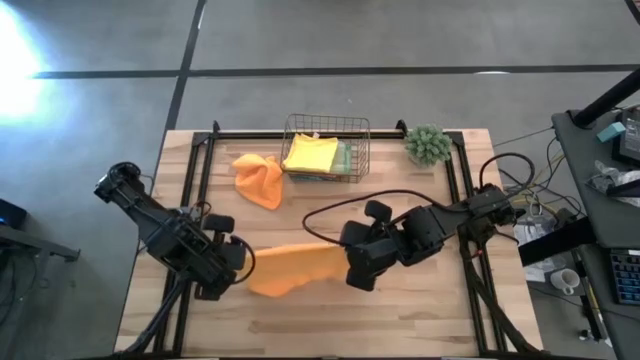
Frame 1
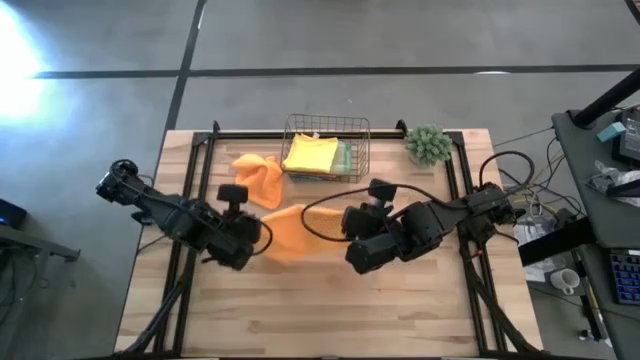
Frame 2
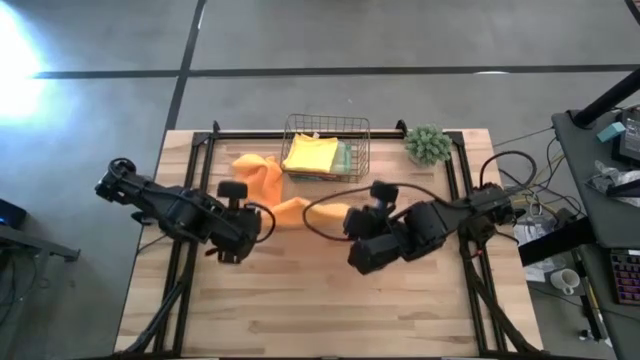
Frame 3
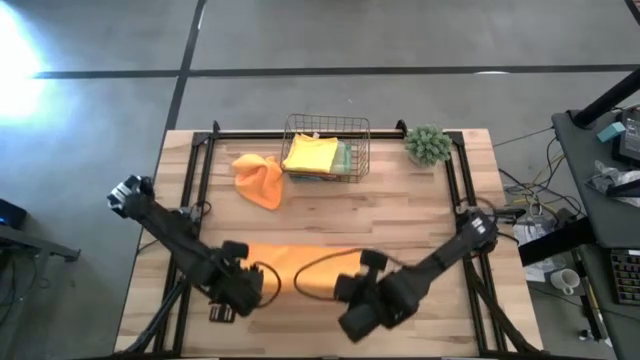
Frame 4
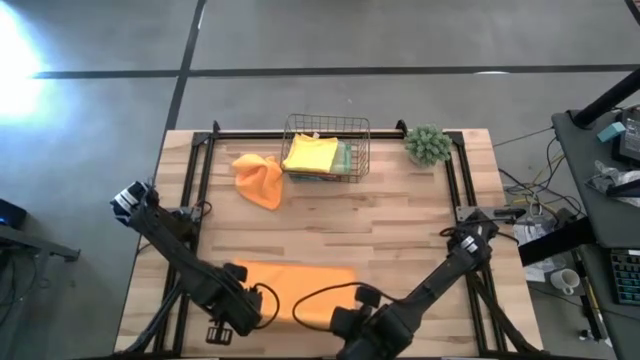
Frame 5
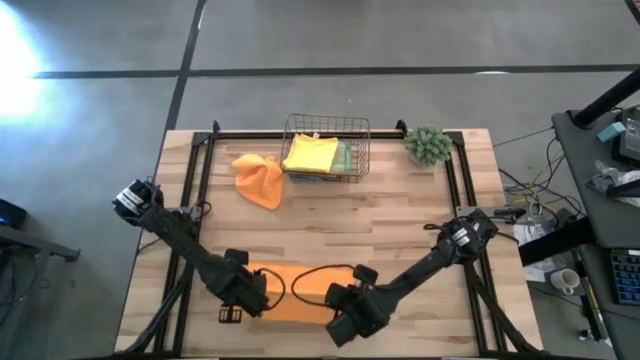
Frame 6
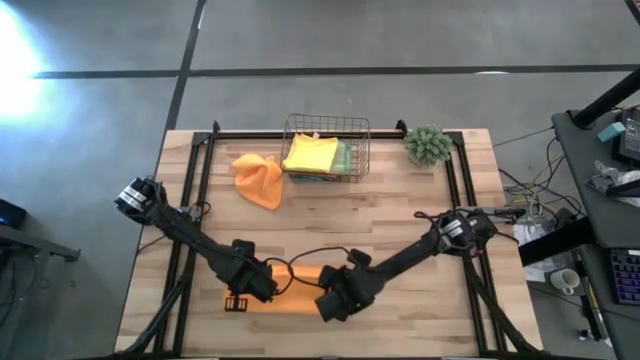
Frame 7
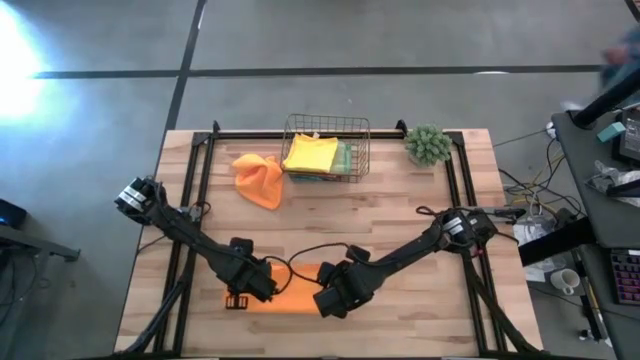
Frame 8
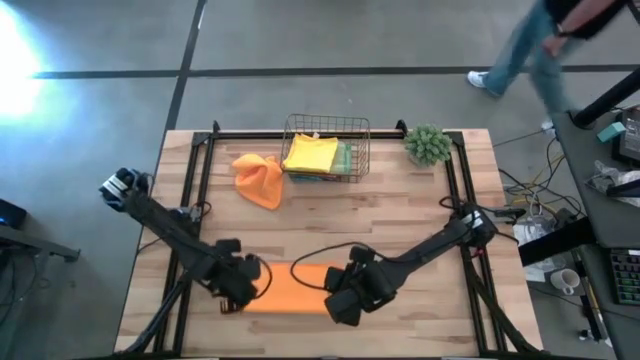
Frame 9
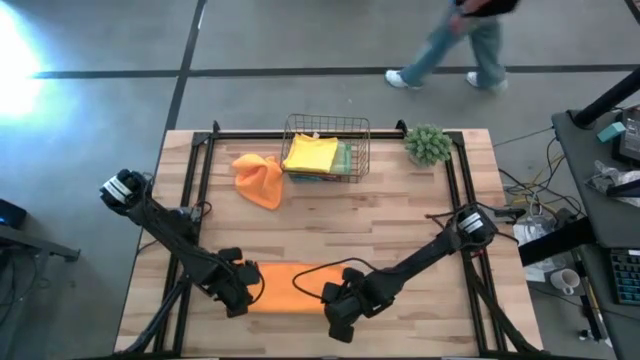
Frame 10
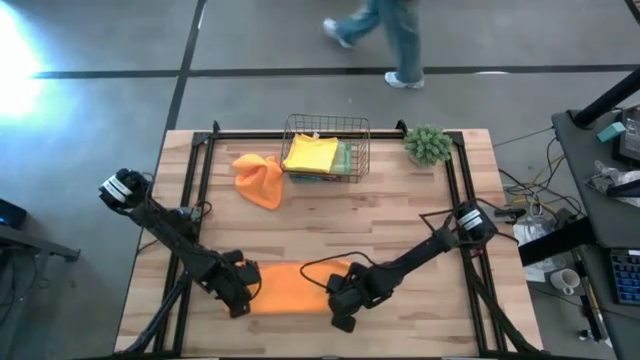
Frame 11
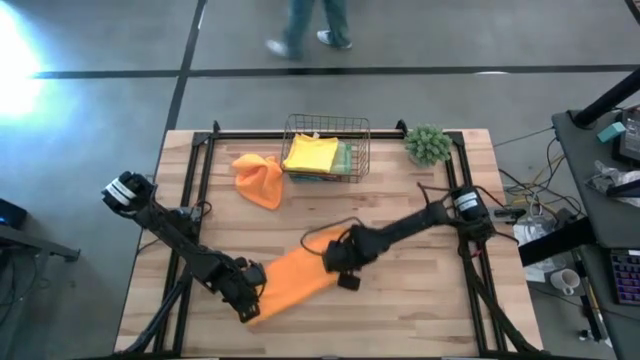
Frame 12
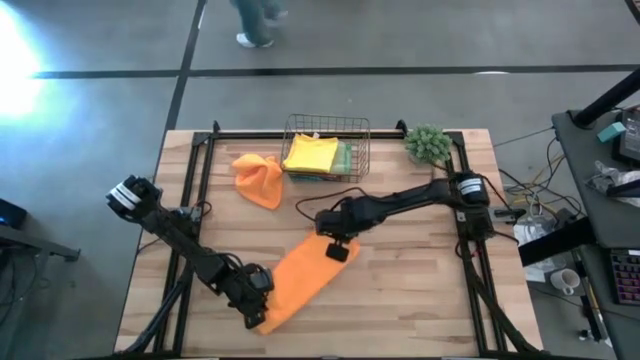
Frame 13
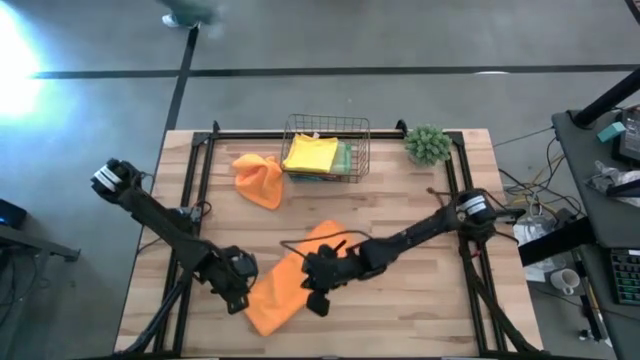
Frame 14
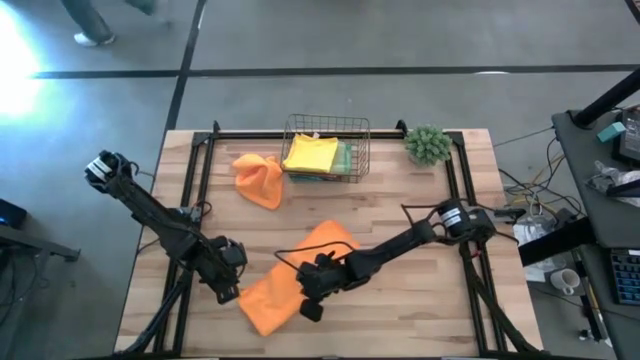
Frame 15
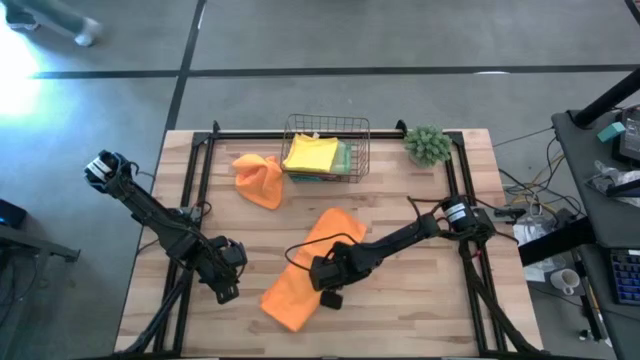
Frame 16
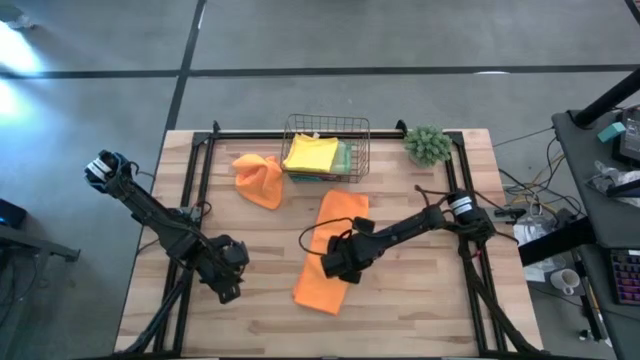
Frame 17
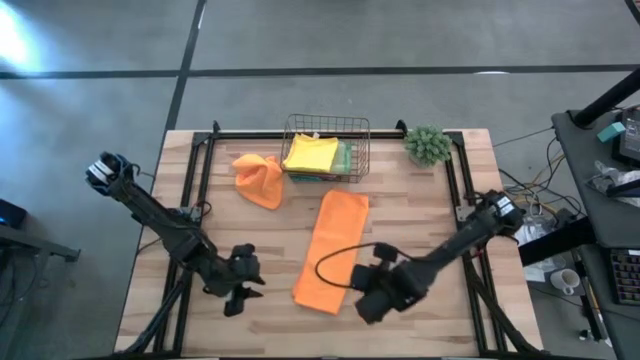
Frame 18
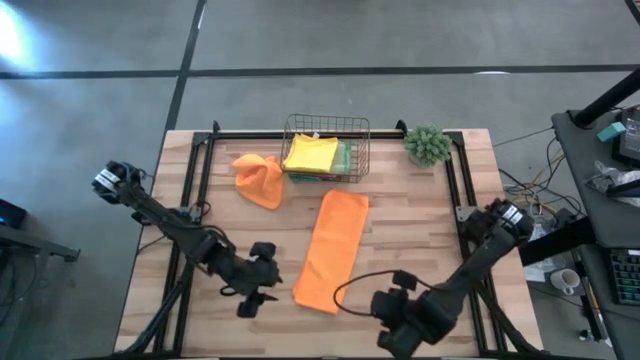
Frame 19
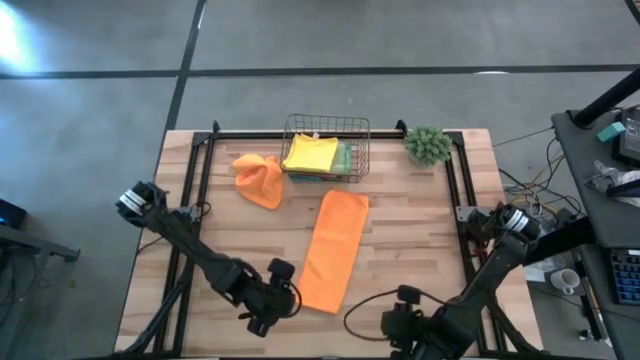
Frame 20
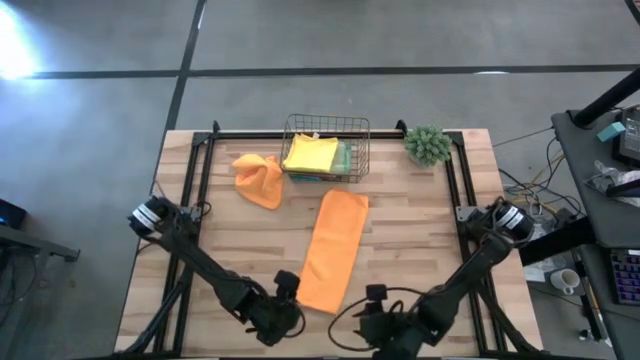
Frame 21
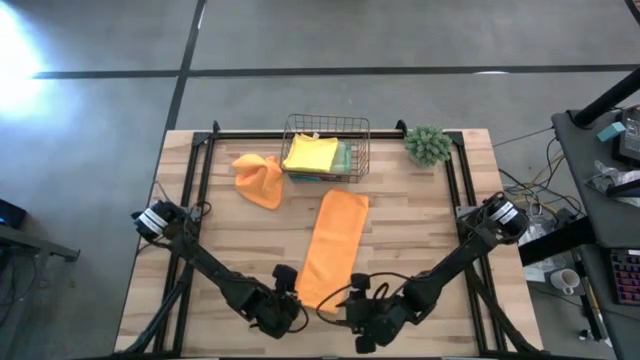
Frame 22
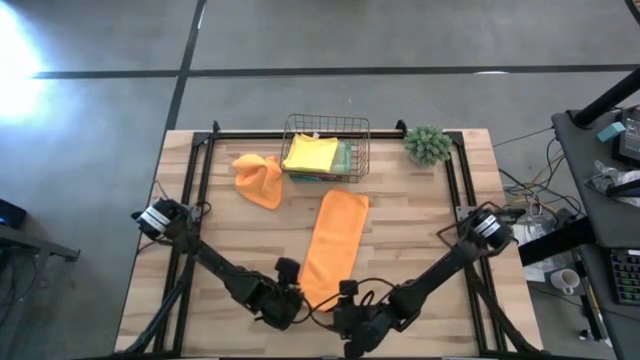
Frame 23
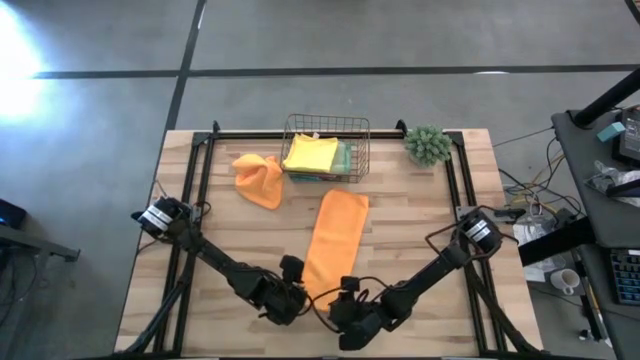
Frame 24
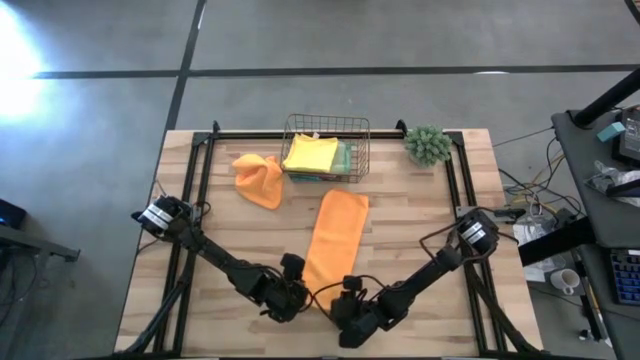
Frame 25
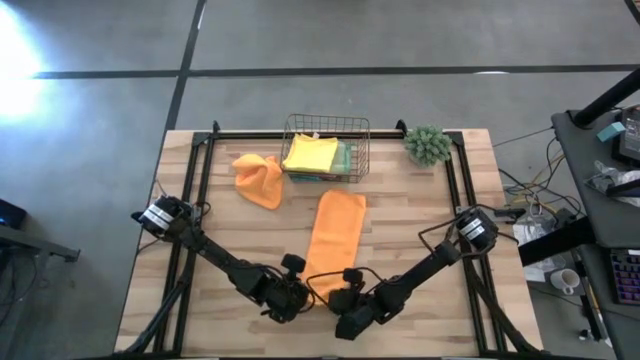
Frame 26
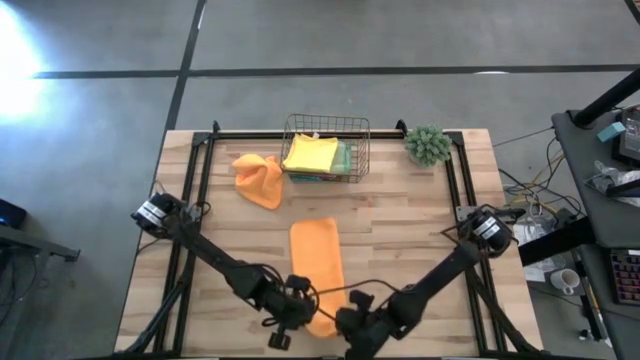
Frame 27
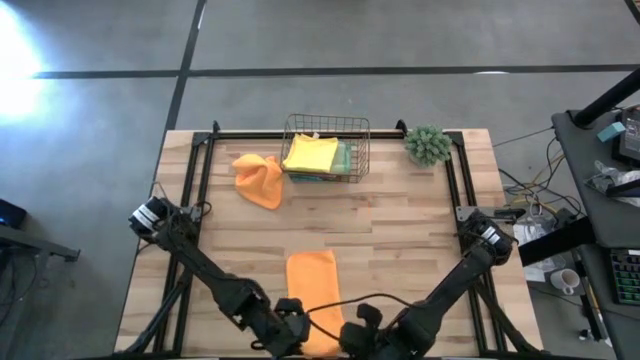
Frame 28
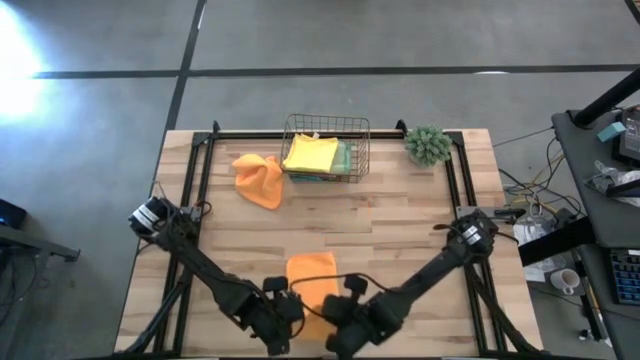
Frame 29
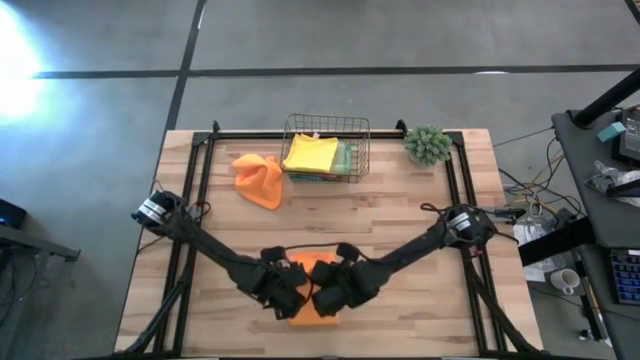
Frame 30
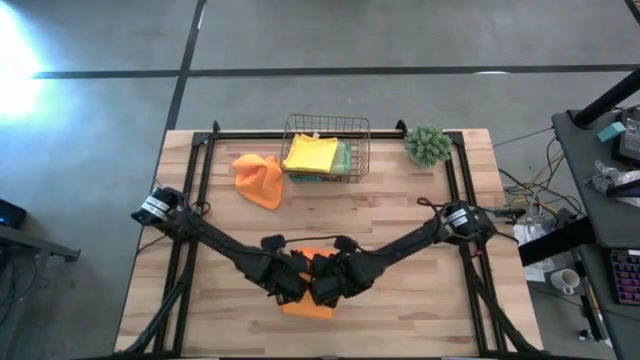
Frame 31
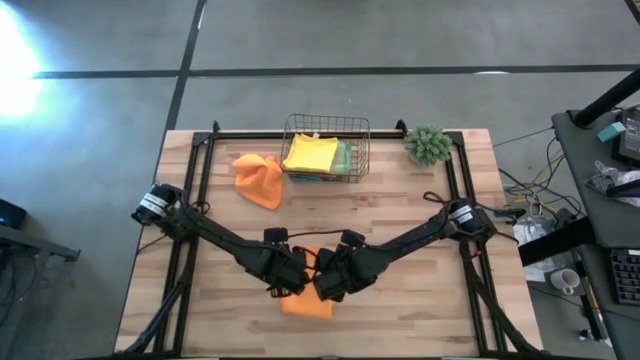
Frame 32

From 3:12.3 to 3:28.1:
Task: Fold microfiber towels
Fold the bottom orange microfiber cloth

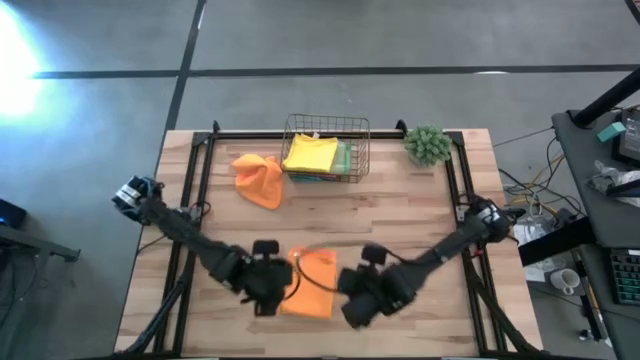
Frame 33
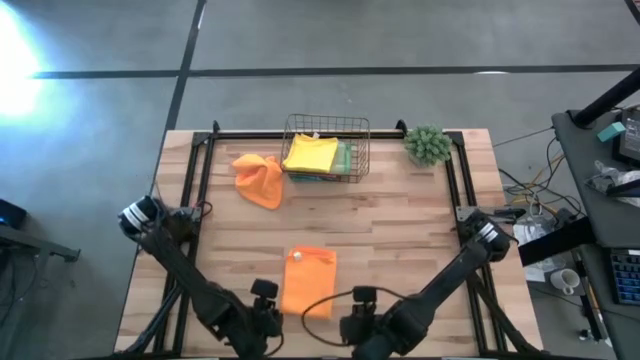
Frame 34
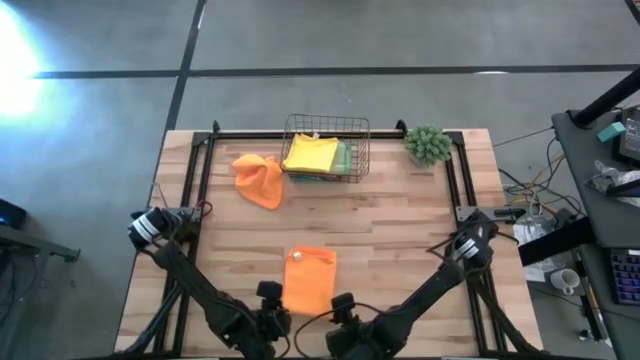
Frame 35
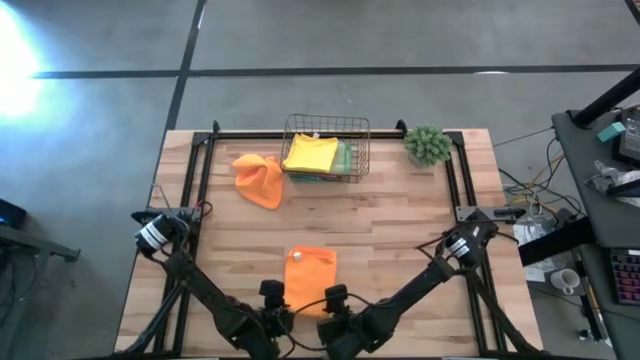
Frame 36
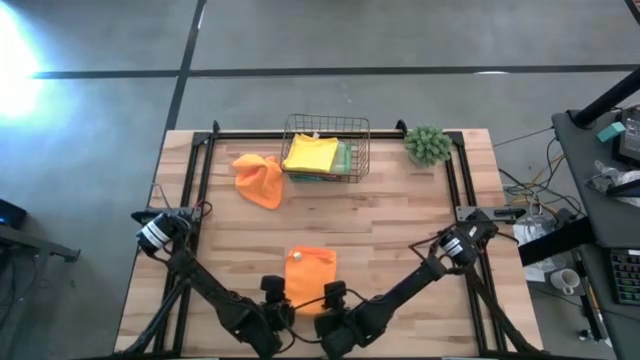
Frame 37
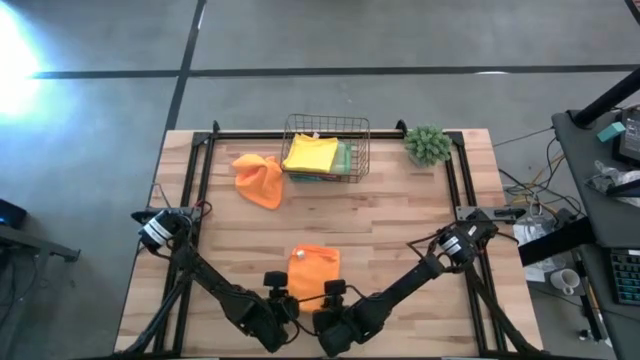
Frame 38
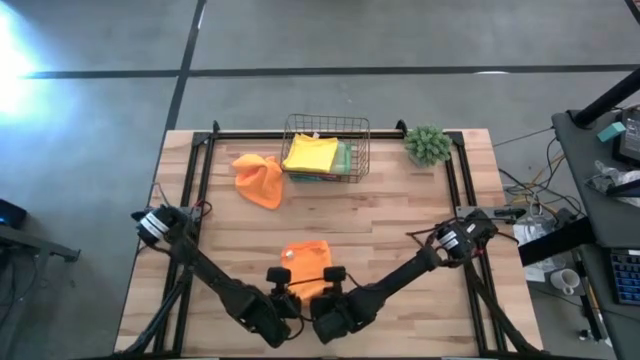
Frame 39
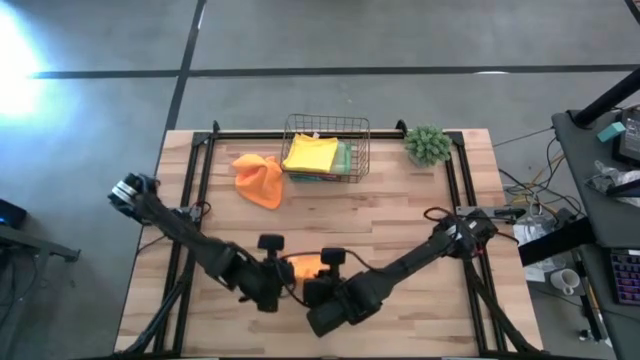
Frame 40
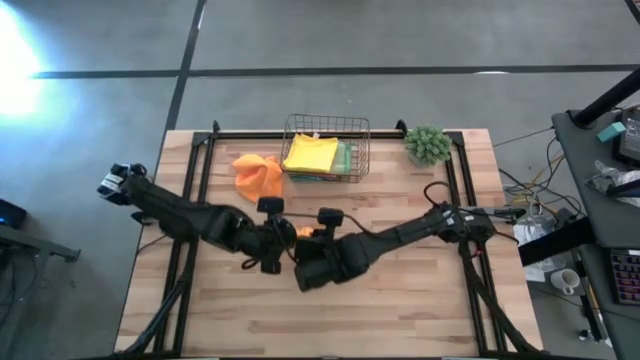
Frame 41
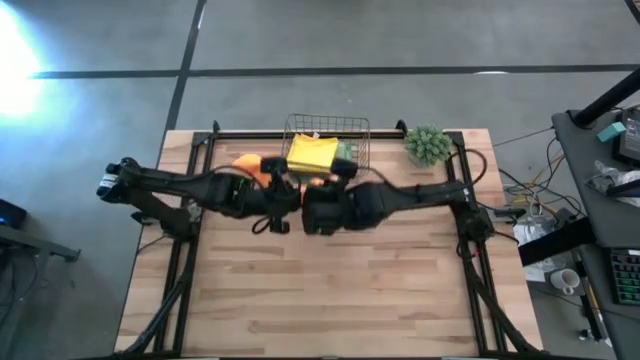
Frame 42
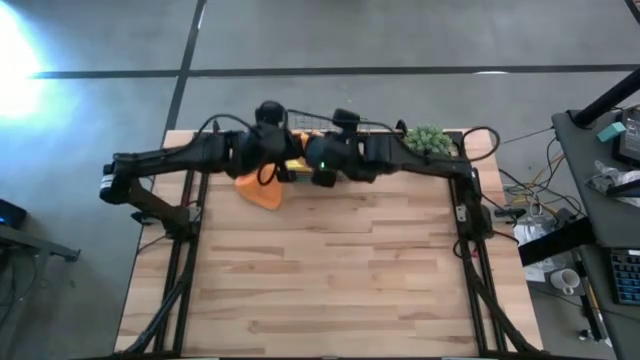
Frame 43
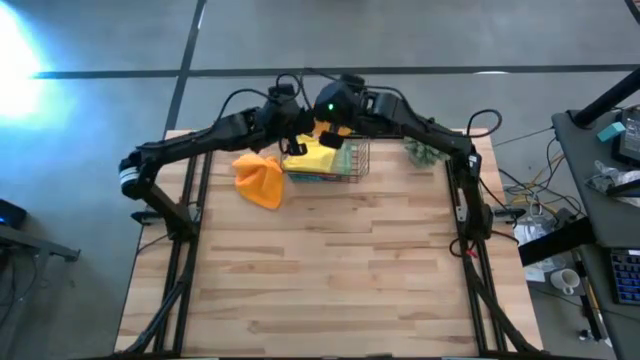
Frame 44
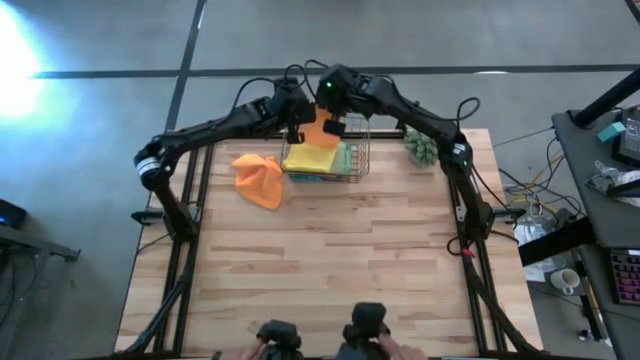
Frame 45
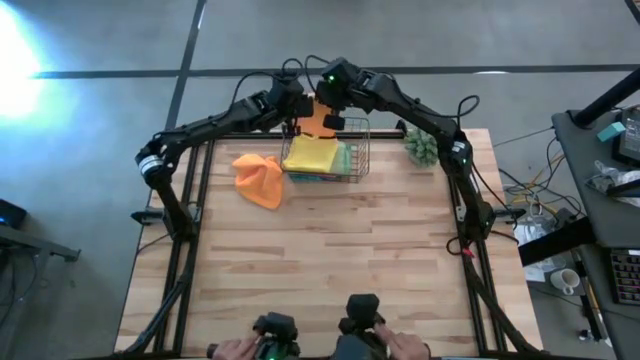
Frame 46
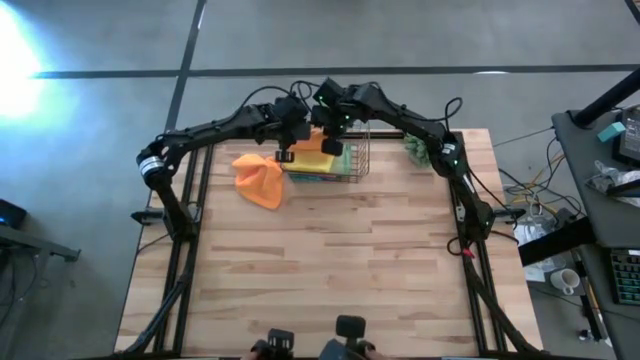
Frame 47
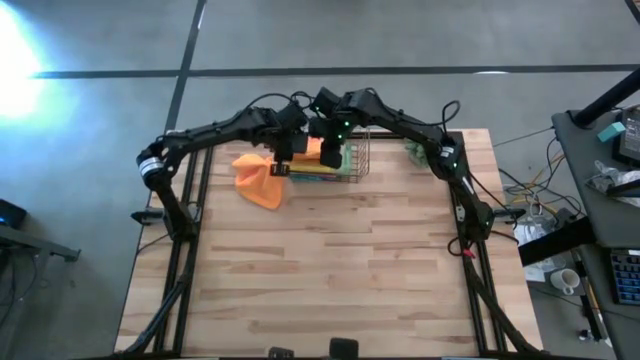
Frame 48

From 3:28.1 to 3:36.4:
Put the bottom orange microfiber cloth into the wire basket
